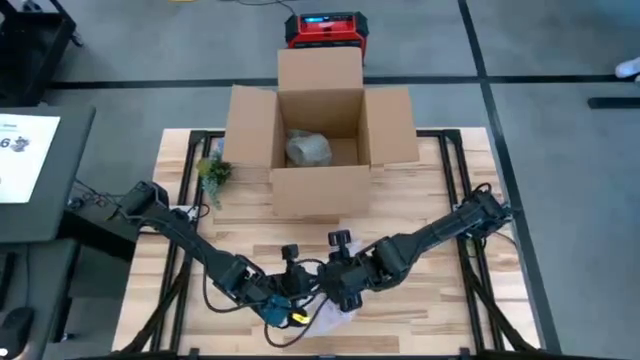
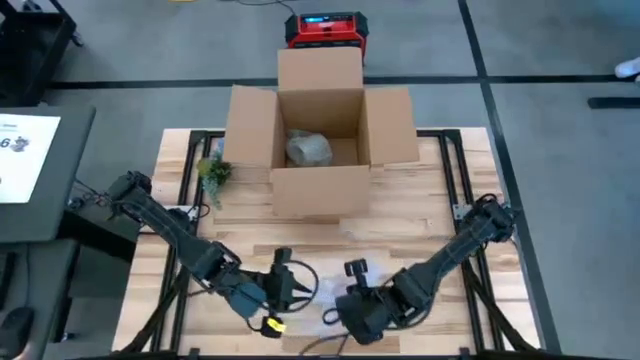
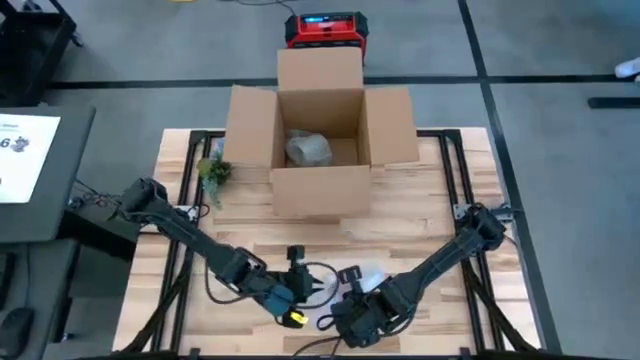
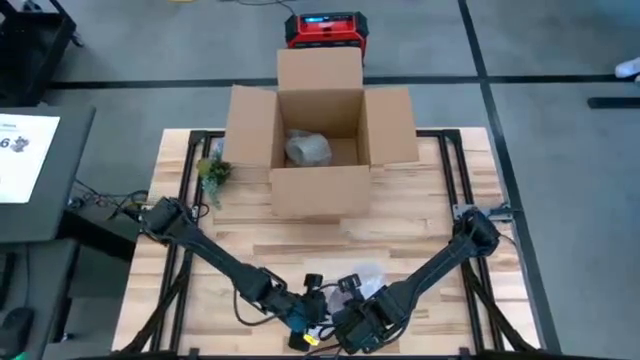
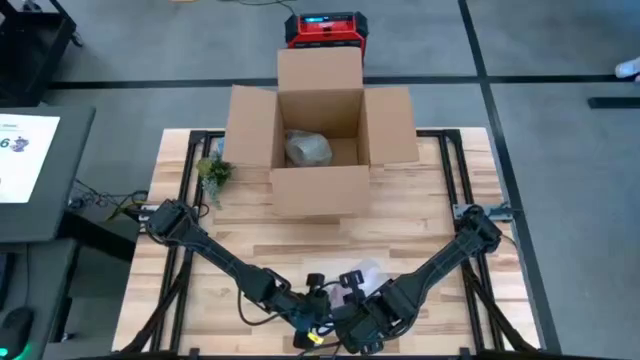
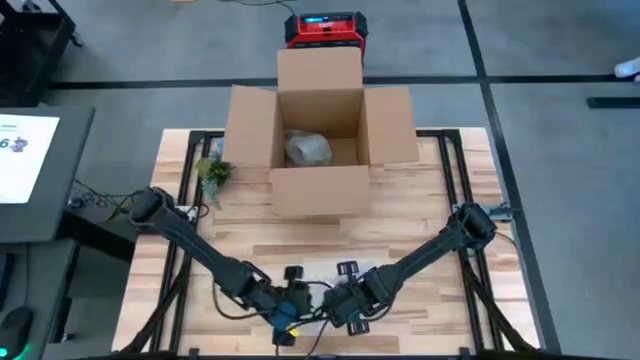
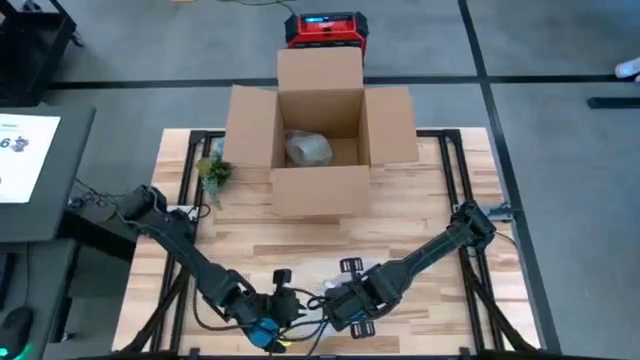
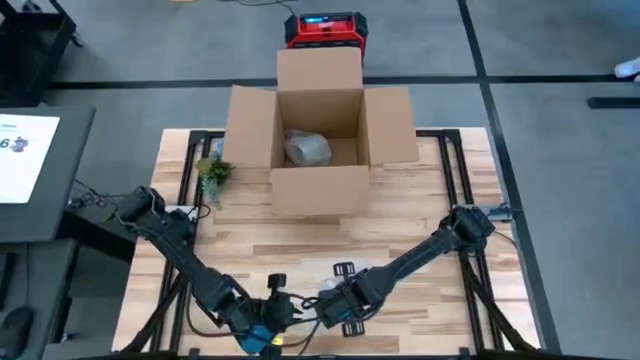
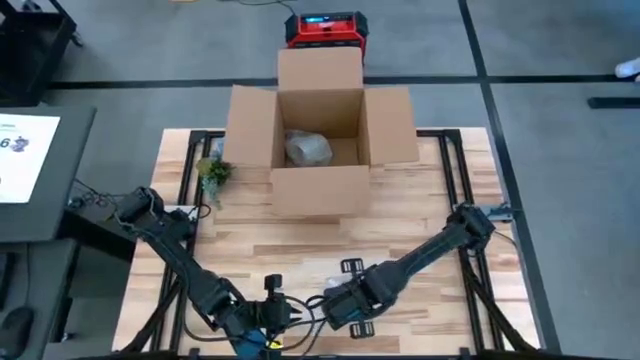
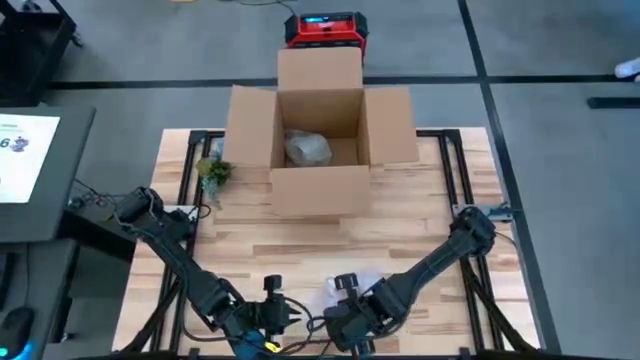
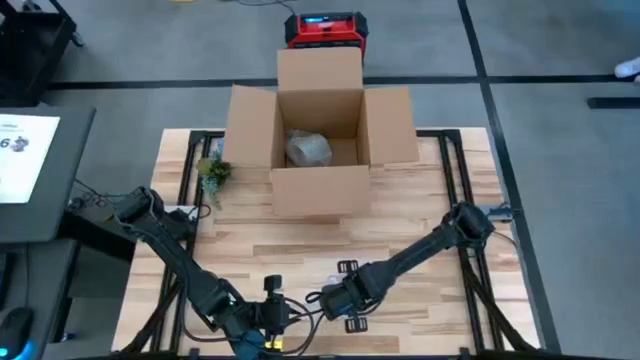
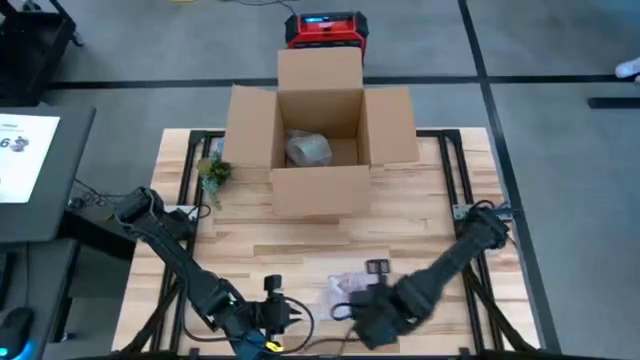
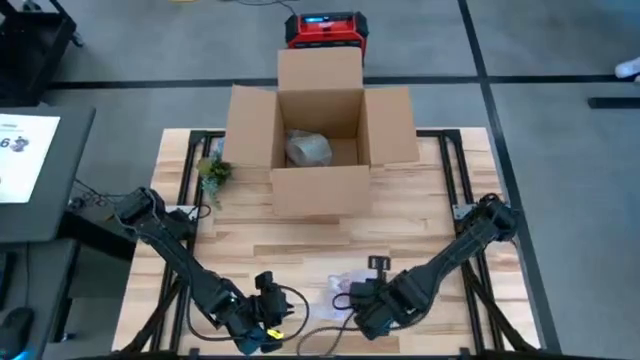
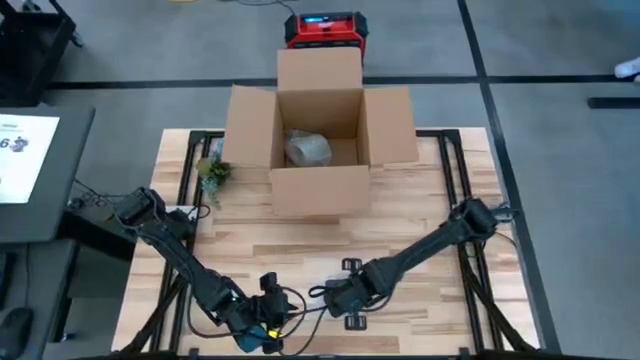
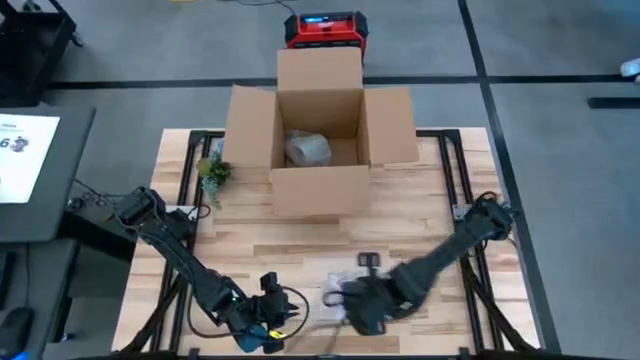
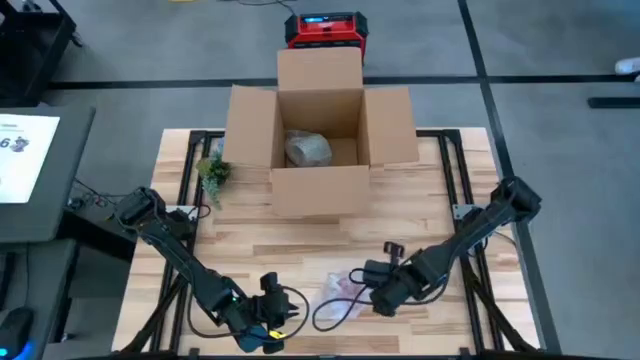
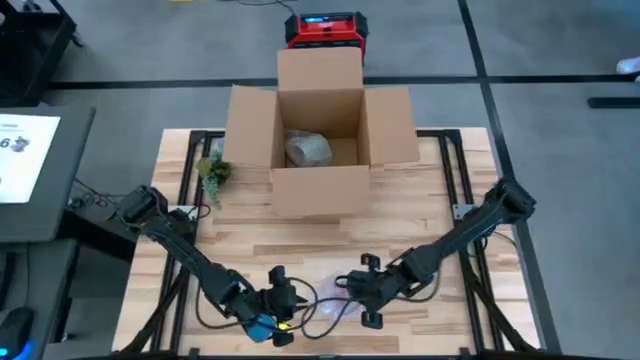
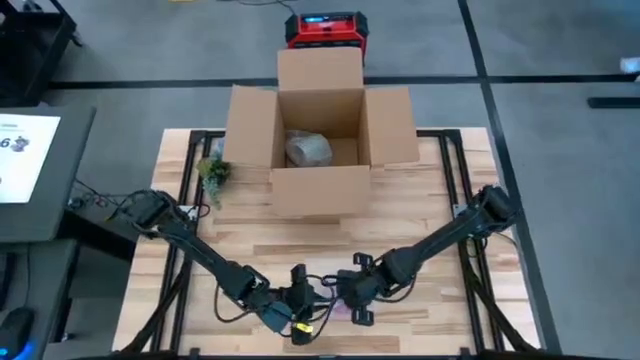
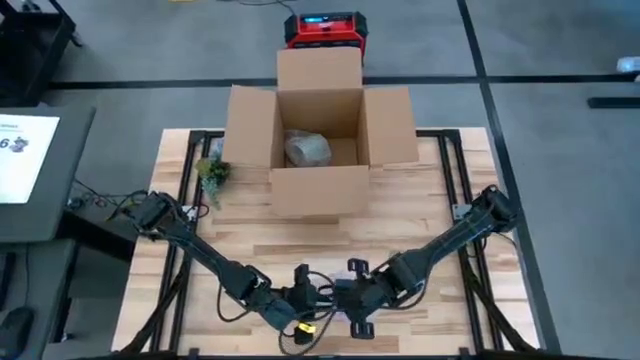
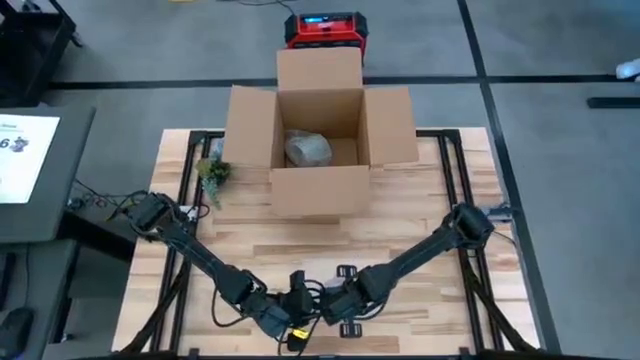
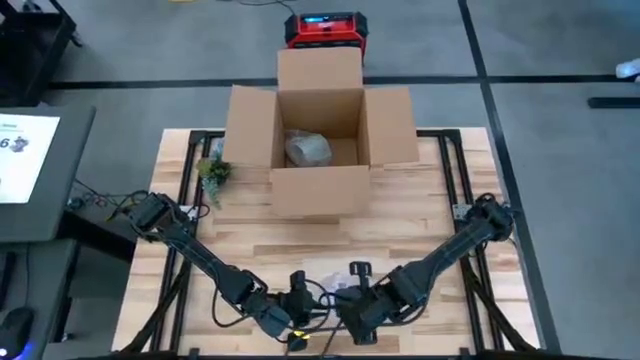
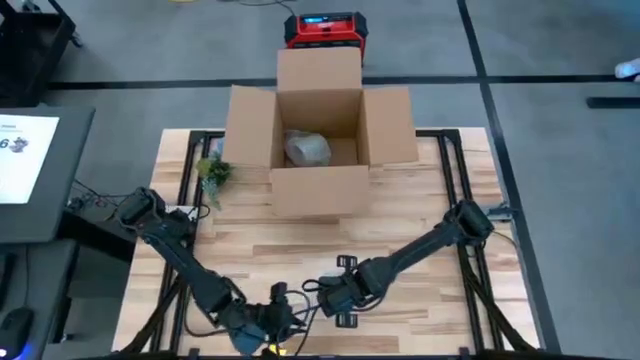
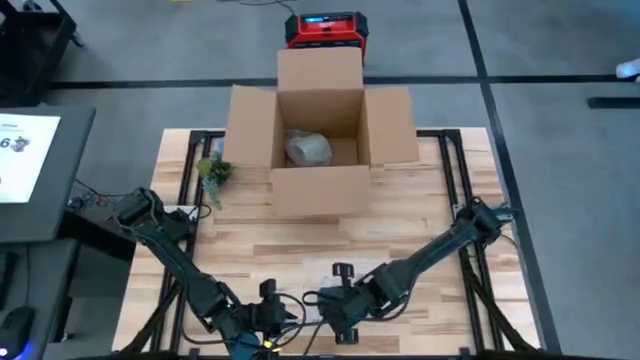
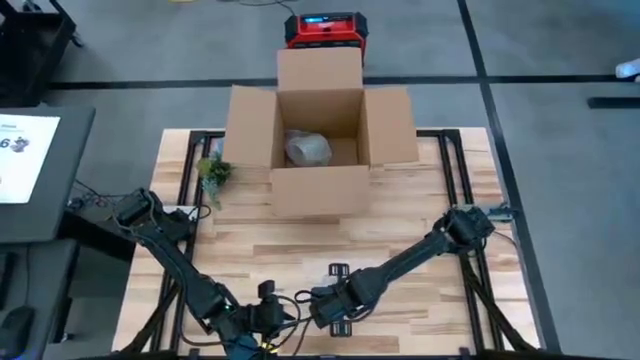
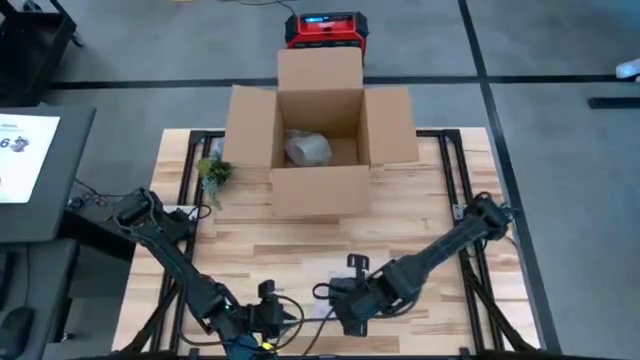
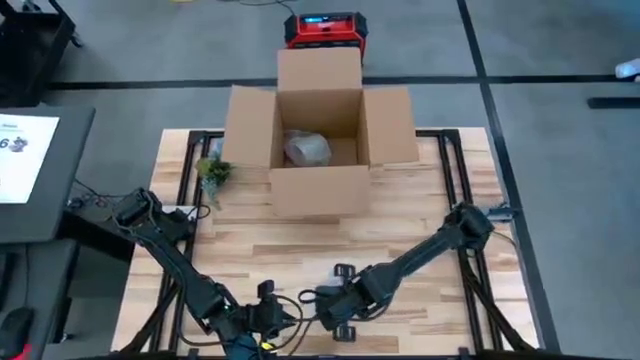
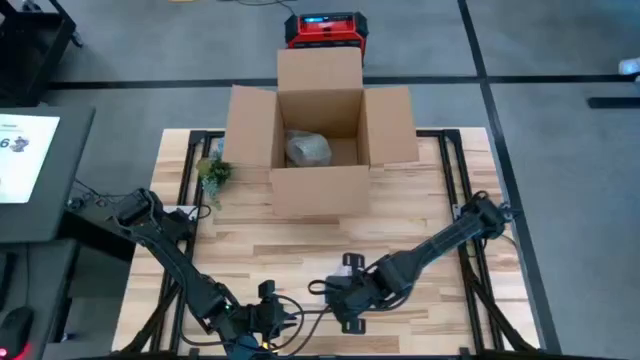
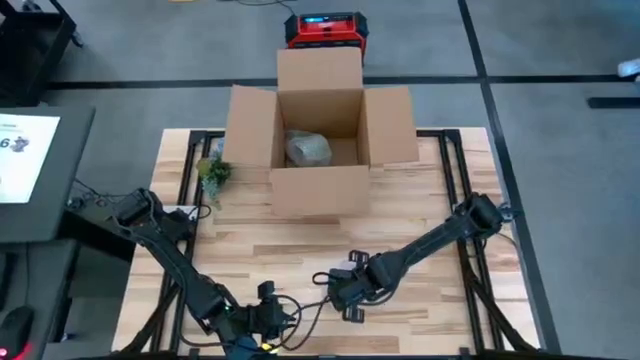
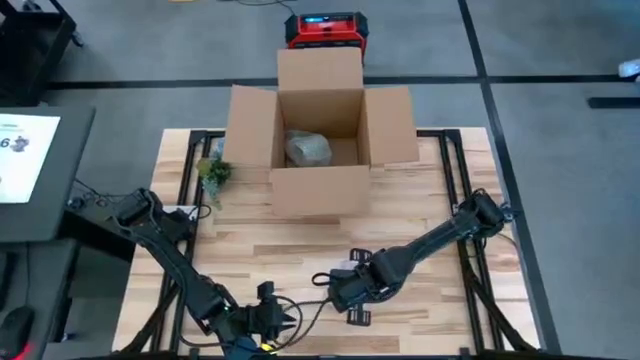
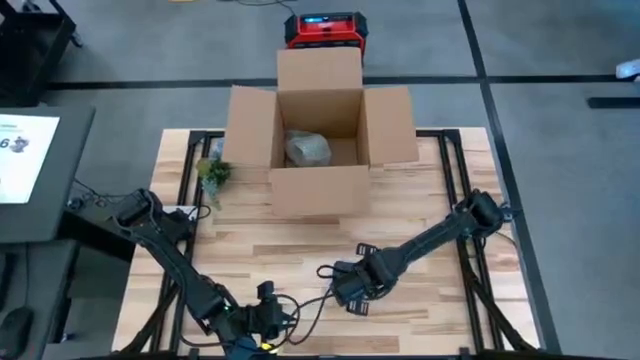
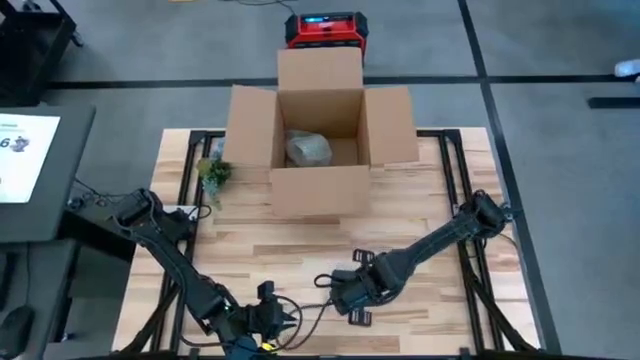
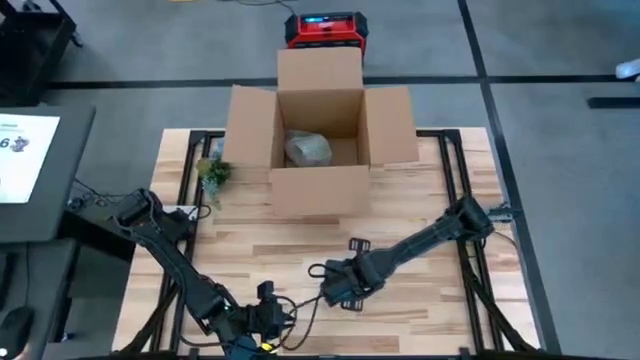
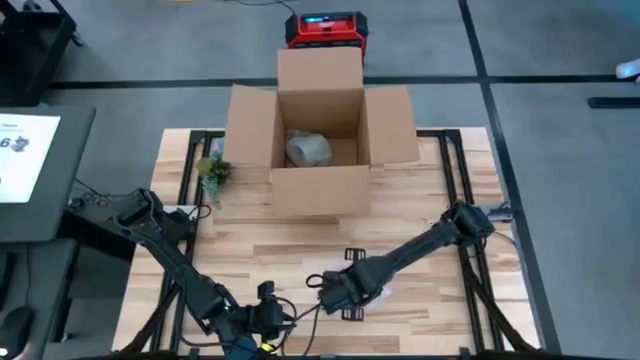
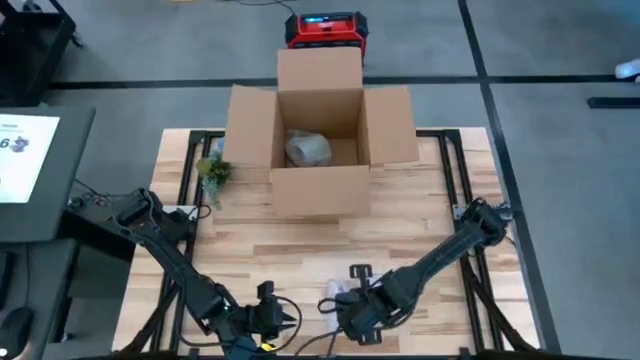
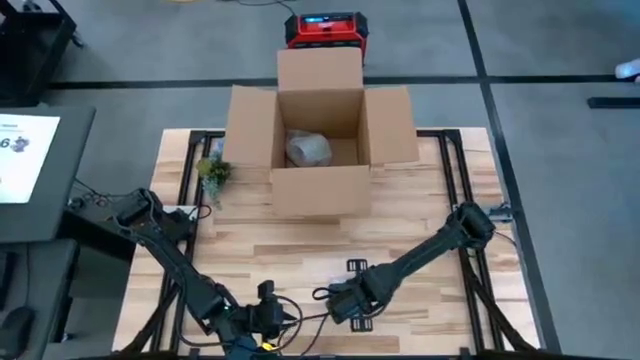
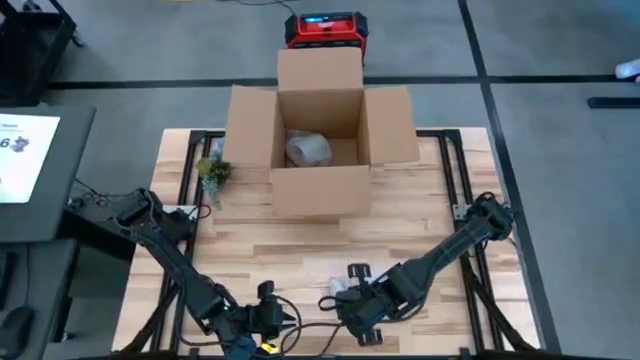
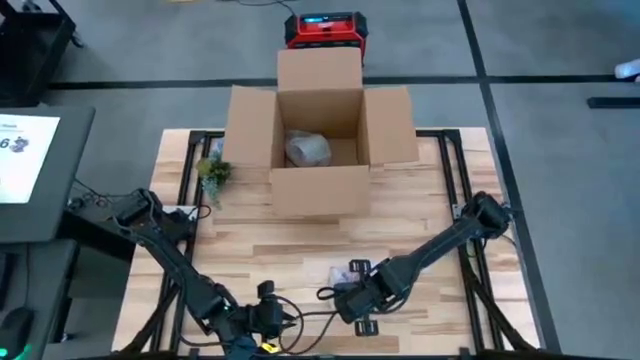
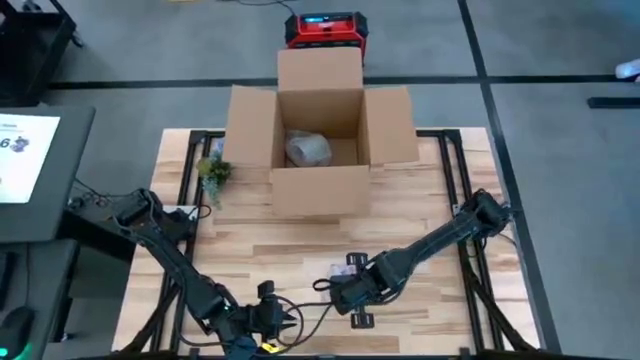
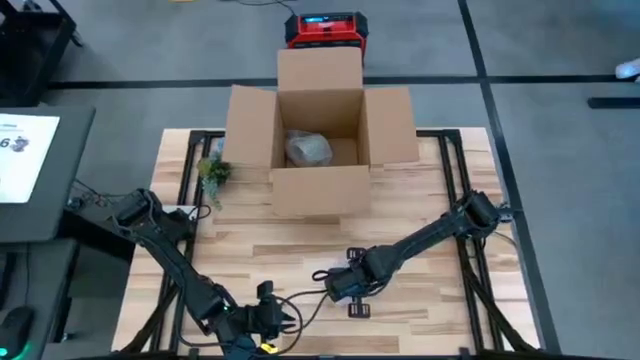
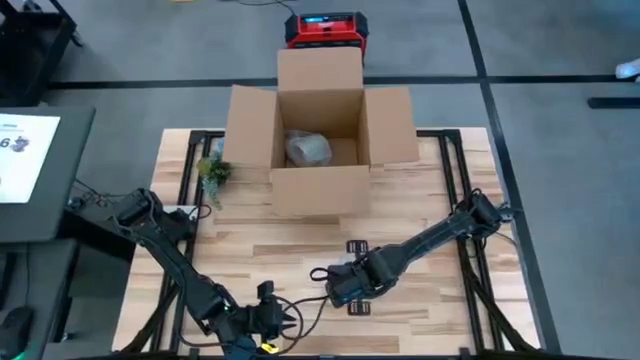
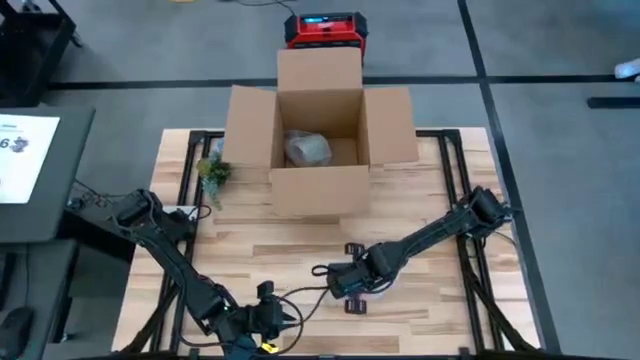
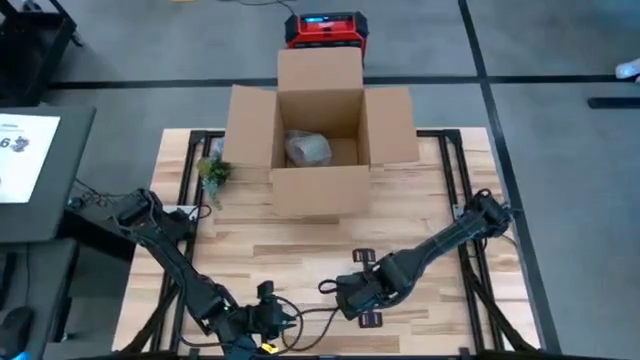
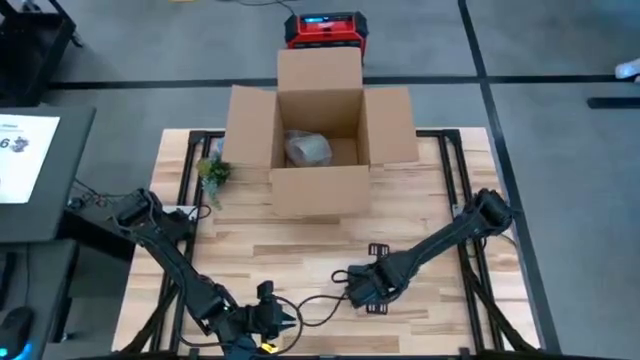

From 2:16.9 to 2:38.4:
Task: wrap mug
Pack the red mug with the bubble wrap
